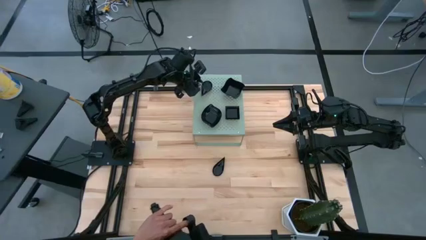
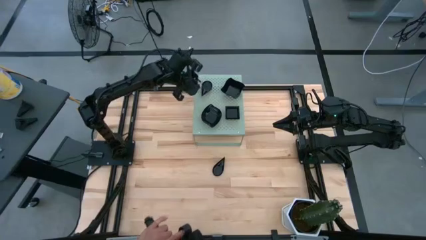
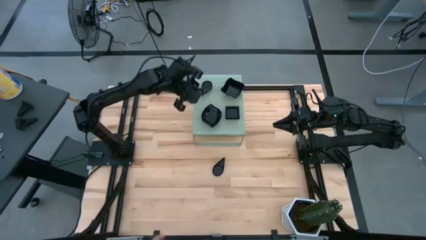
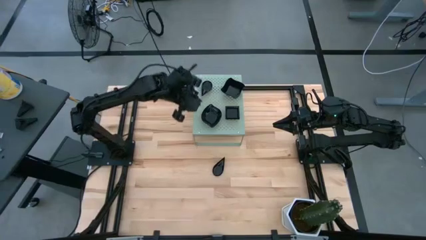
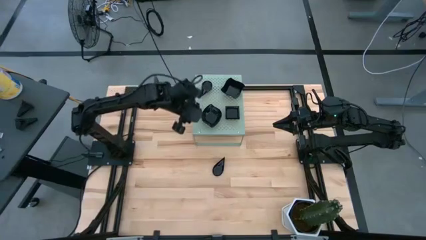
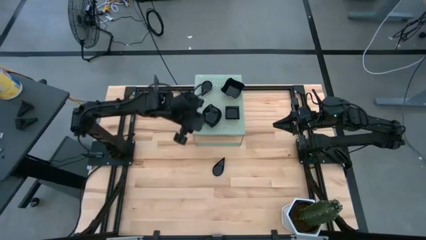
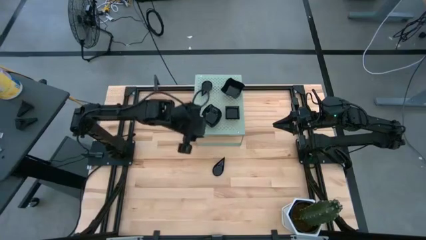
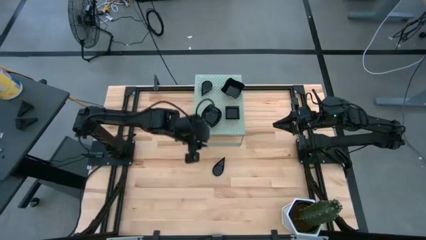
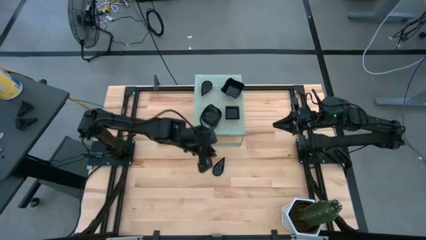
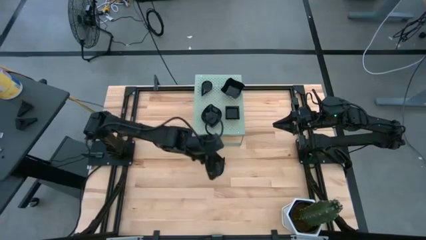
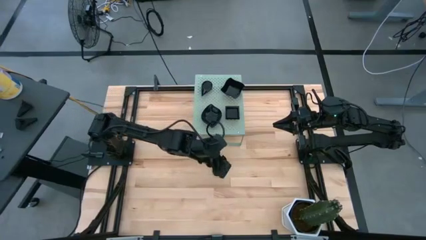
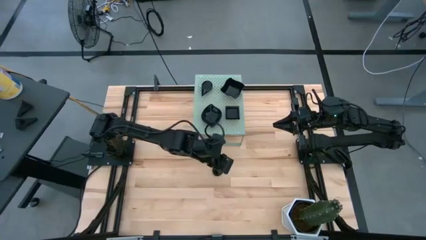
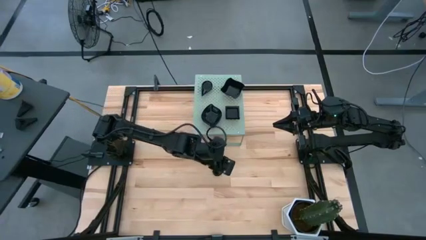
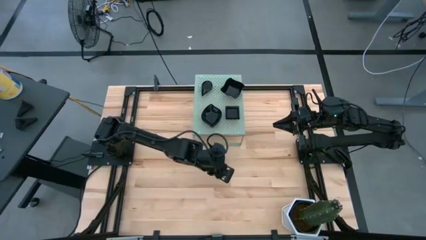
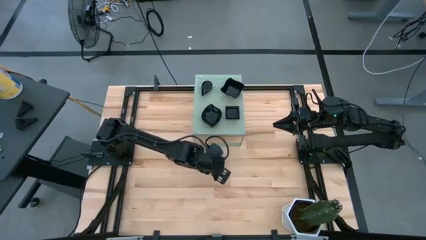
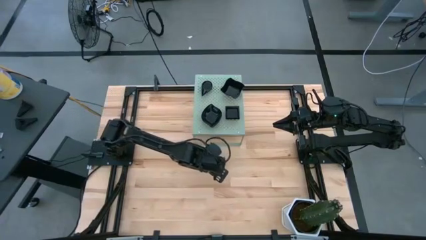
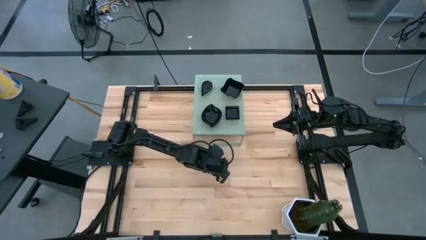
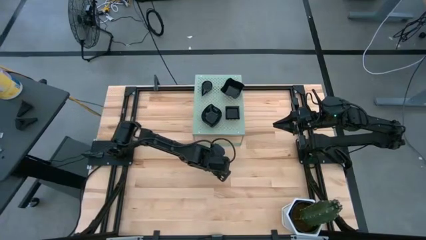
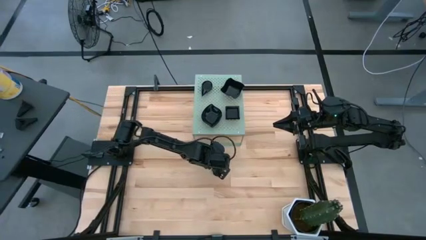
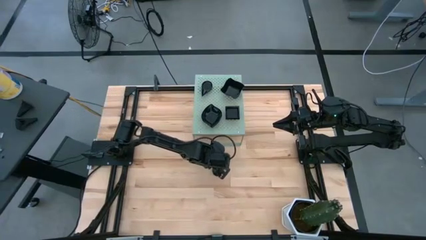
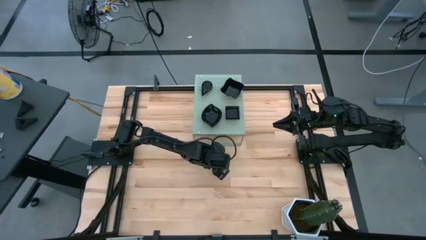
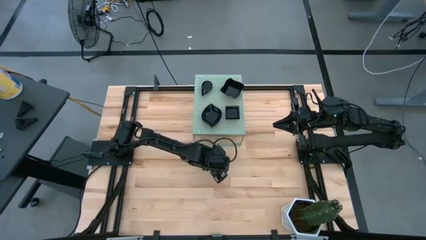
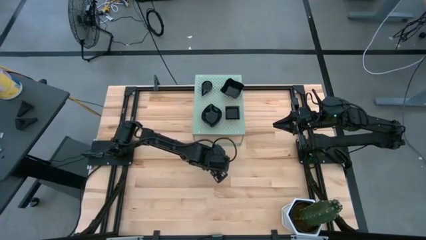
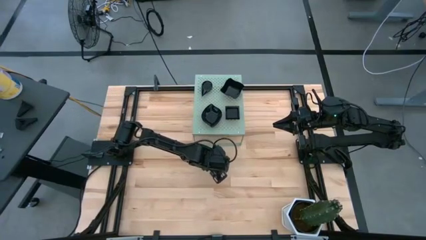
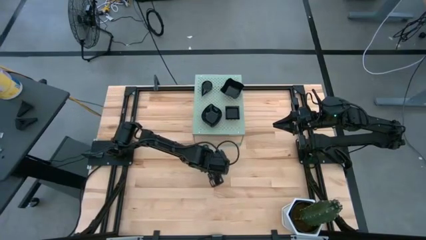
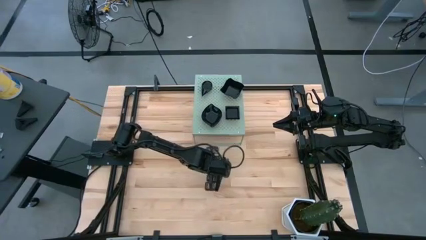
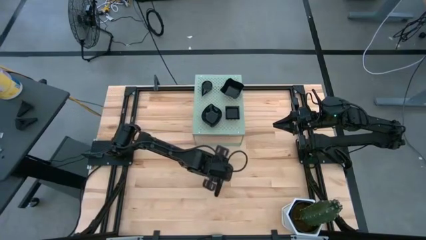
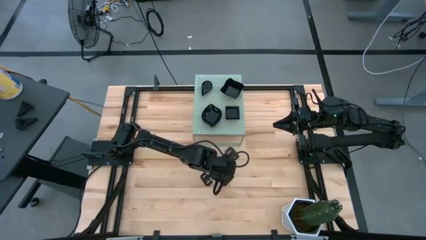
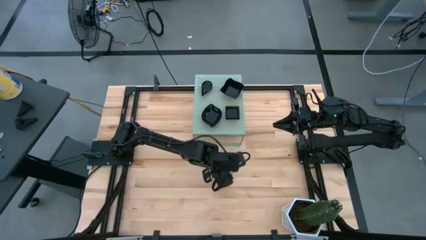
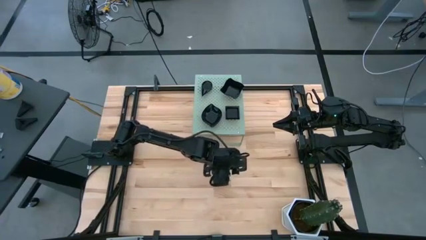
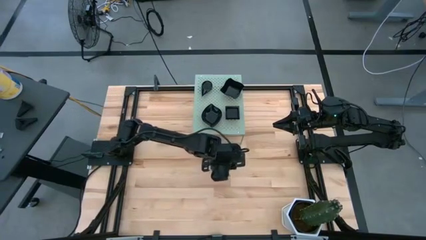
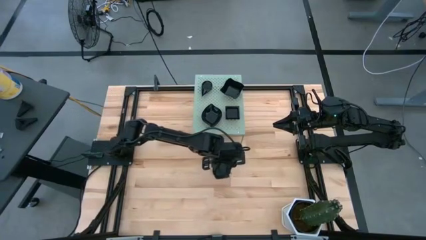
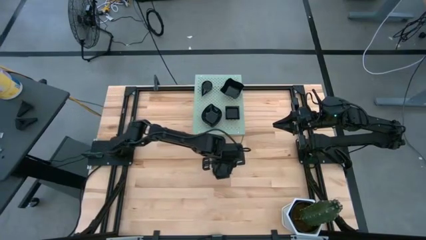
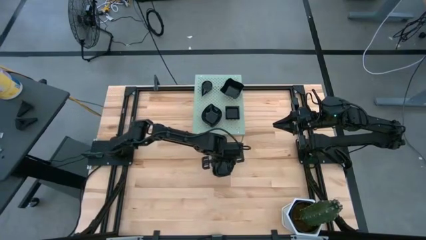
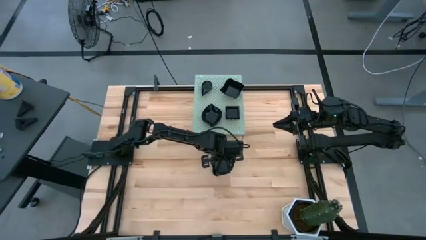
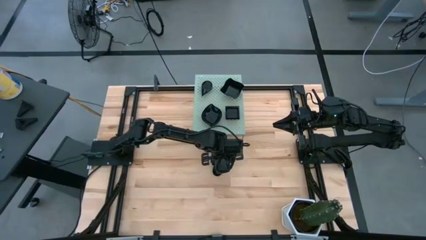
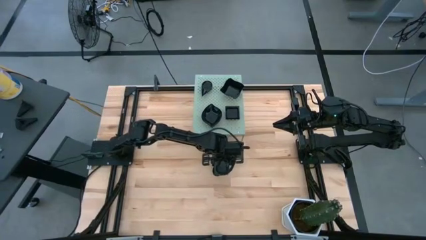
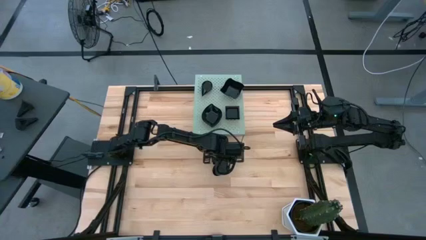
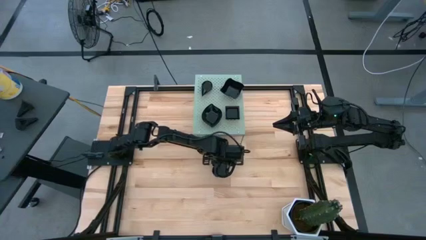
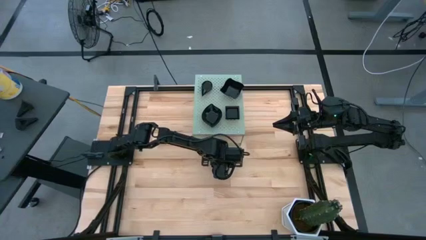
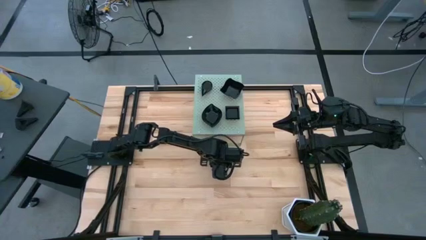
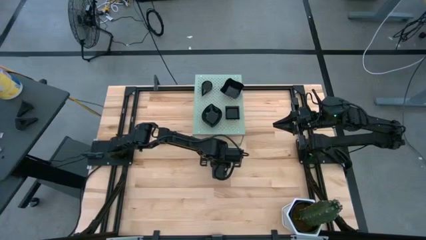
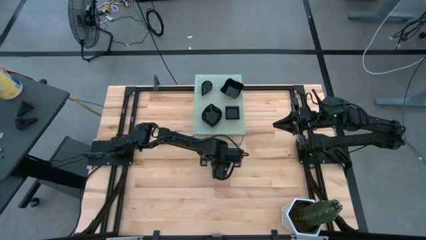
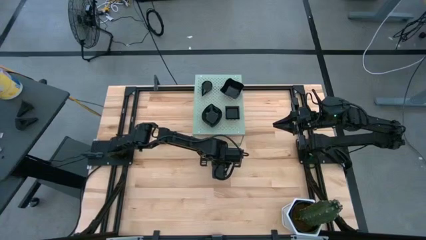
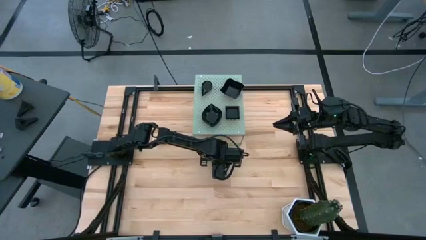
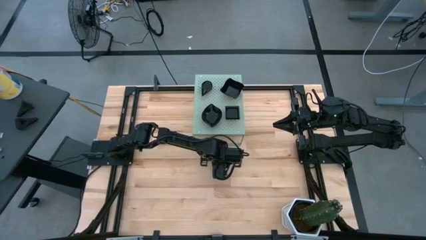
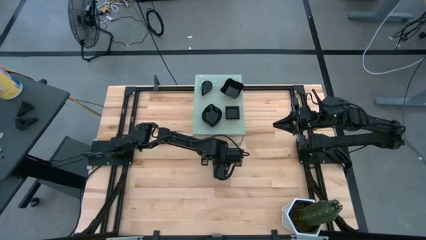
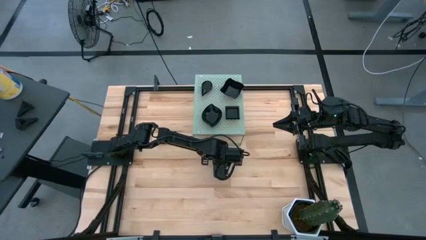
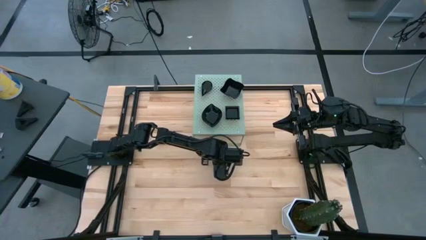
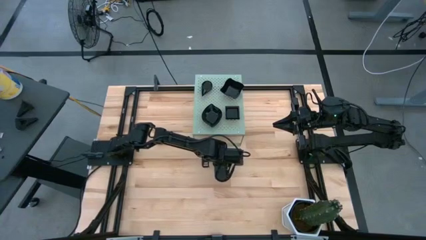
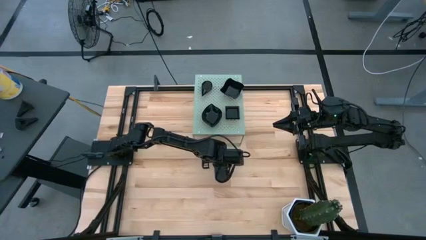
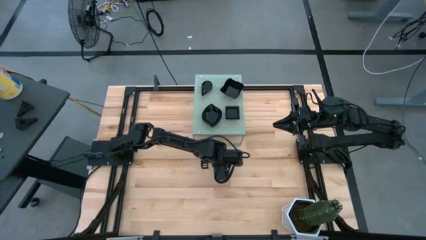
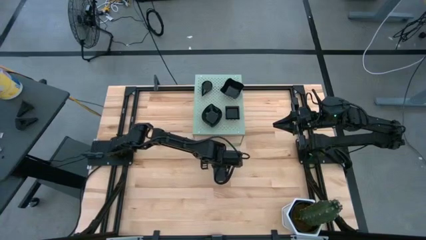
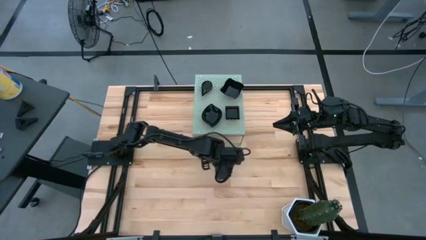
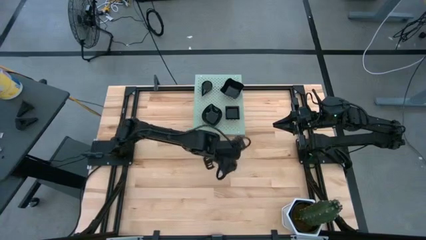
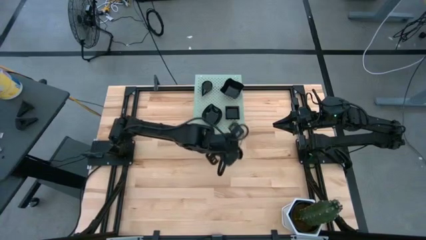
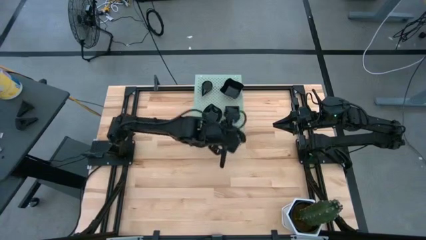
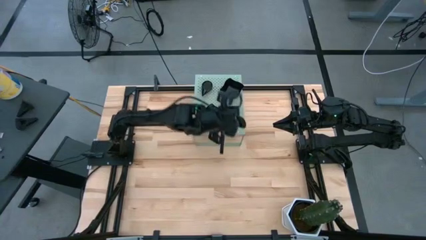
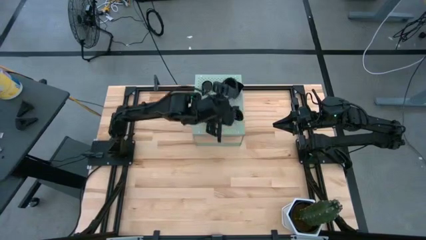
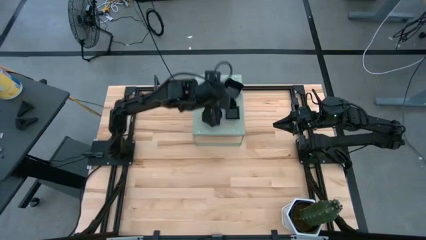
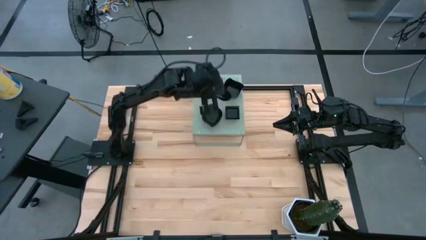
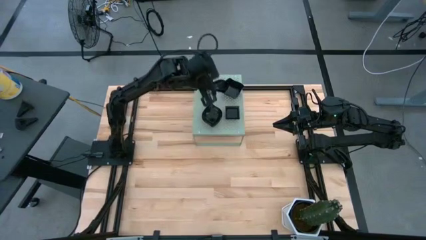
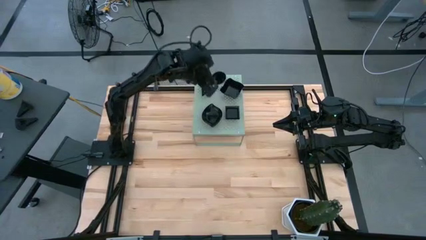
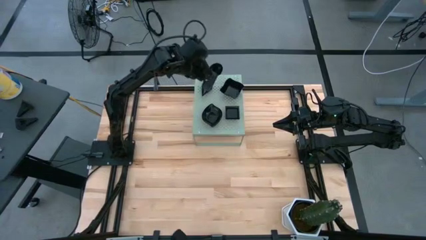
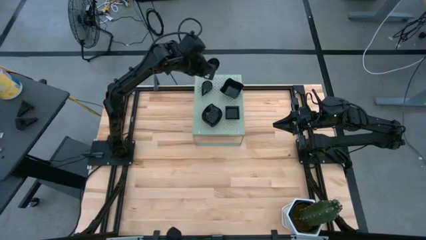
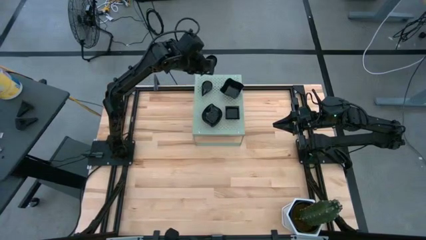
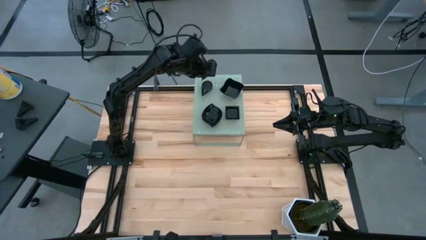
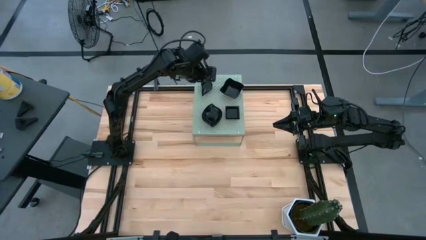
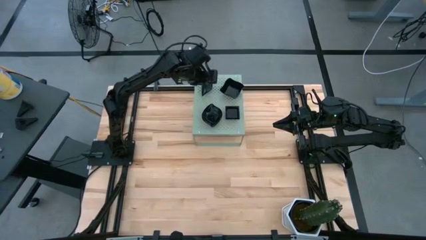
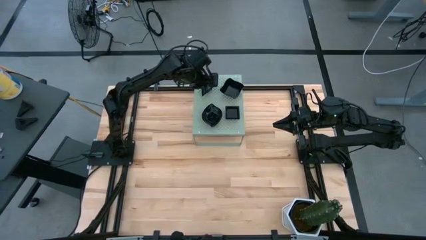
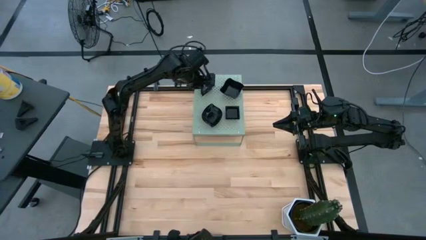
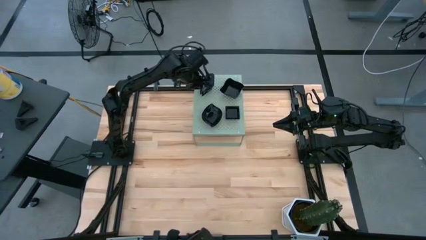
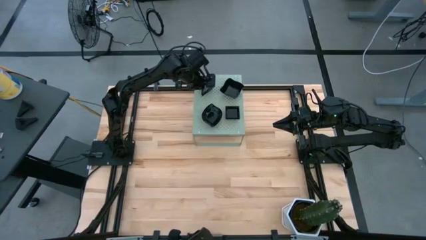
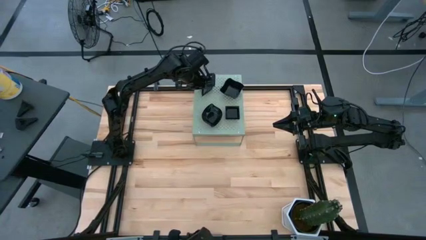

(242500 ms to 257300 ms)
Task: Pick & Place Mini shaped plates
Stack the drop shaped plate on top of the drop shaped plates on the shelf

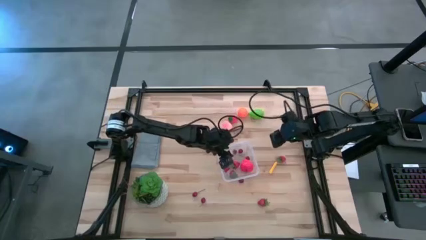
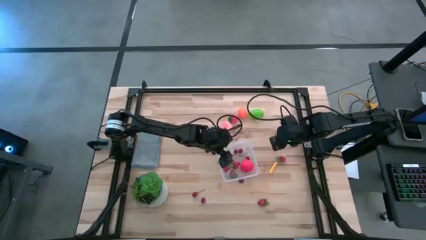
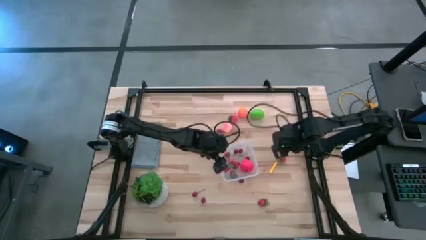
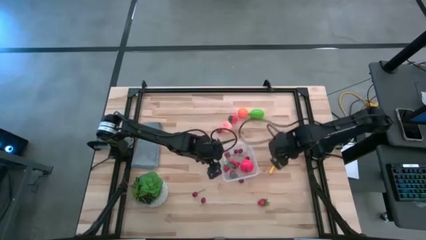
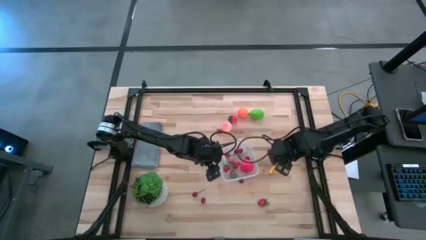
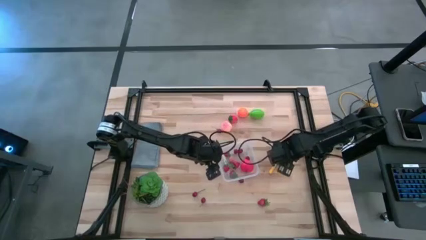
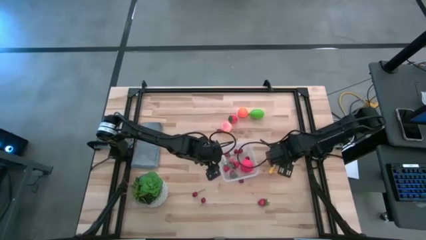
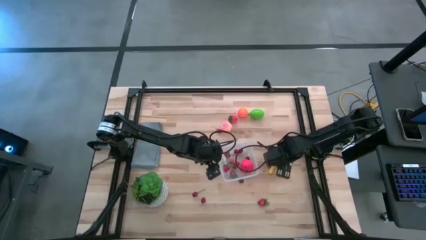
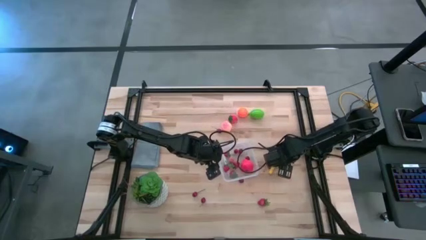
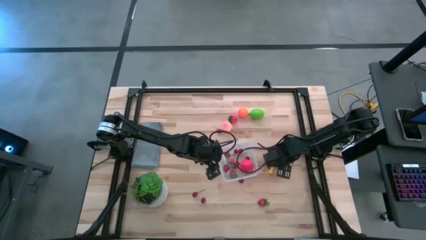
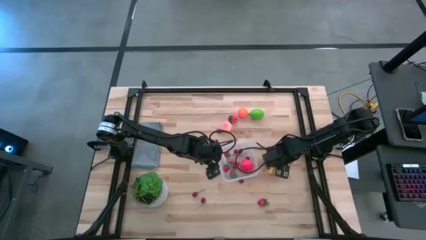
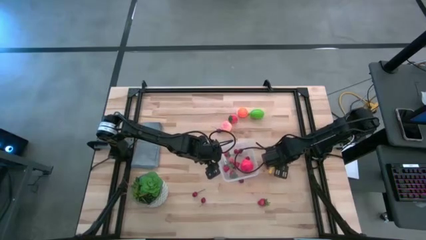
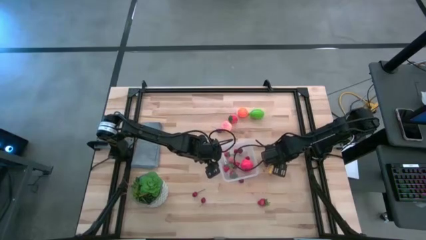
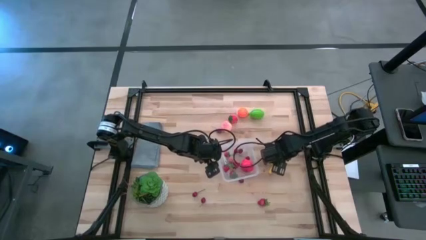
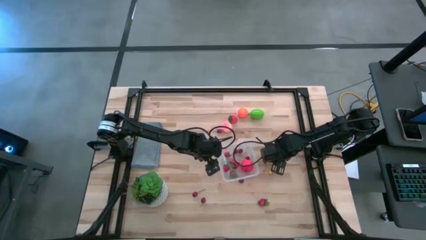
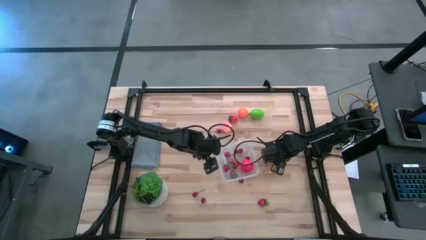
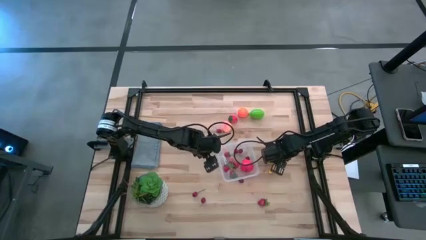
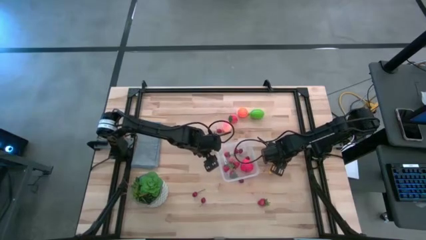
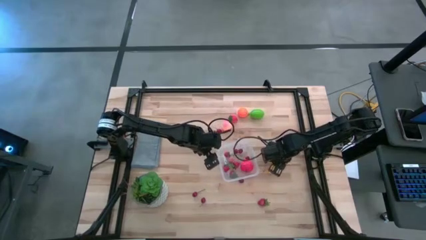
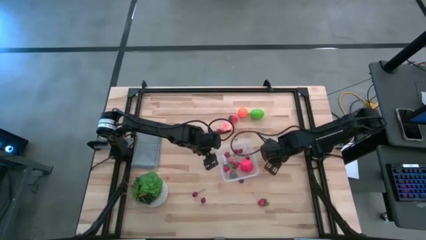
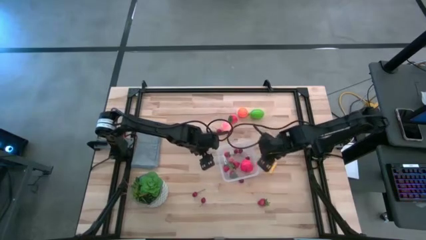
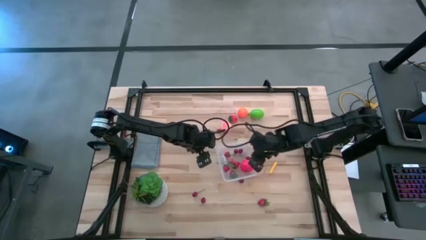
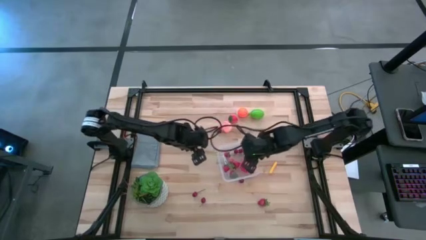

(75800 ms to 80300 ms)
Task: Pick and placing Produce into tupperware
Put the middle strawberry into the transparent bin
